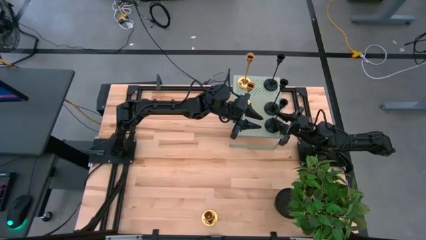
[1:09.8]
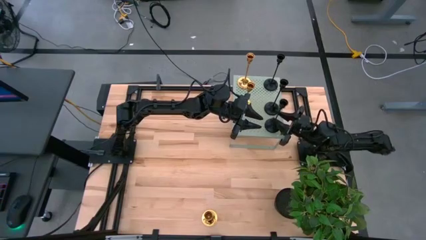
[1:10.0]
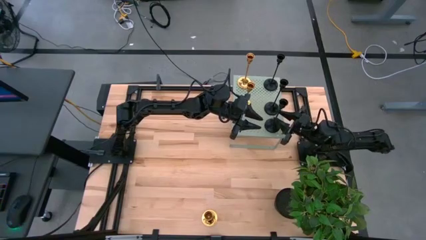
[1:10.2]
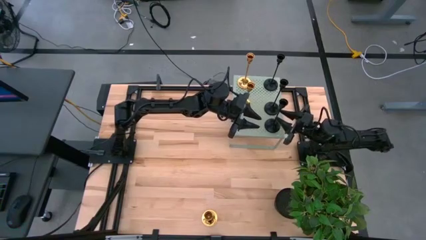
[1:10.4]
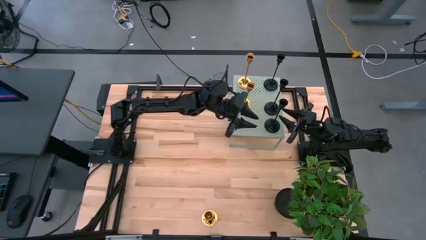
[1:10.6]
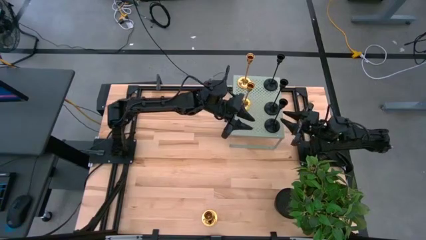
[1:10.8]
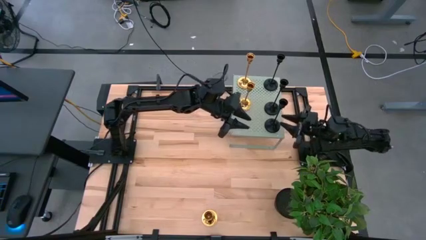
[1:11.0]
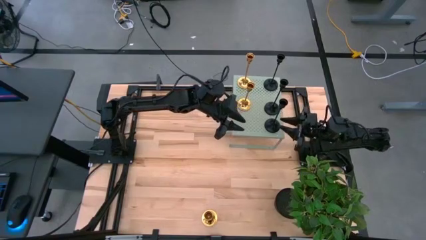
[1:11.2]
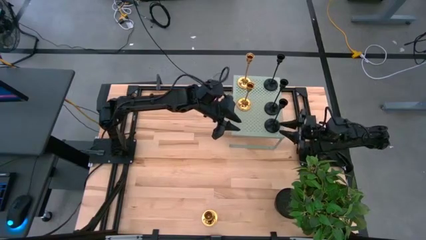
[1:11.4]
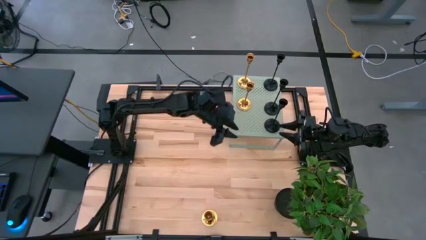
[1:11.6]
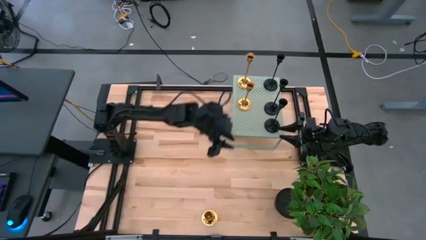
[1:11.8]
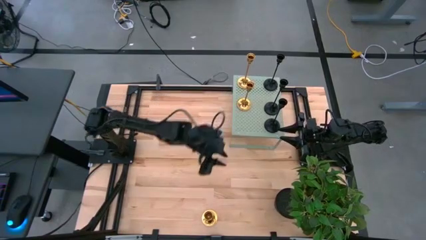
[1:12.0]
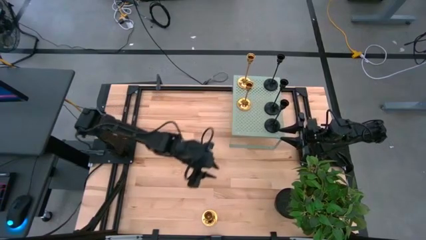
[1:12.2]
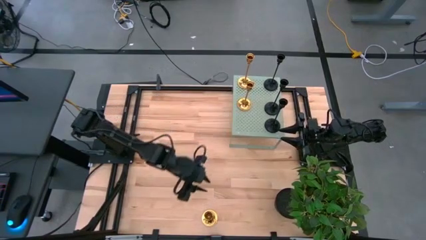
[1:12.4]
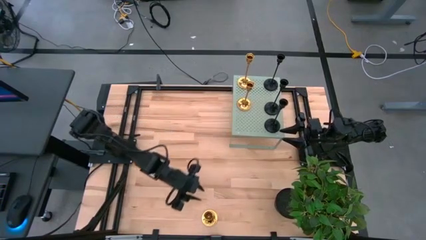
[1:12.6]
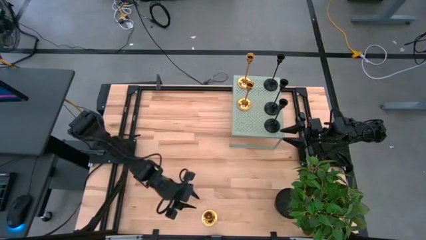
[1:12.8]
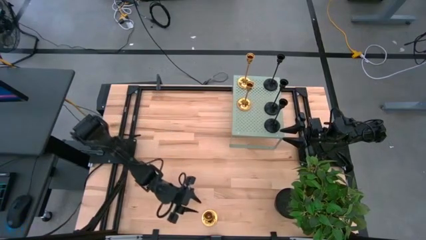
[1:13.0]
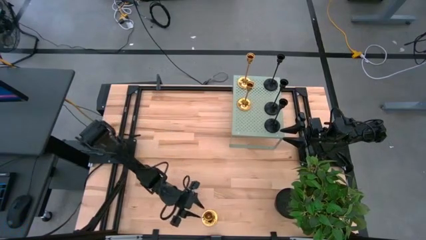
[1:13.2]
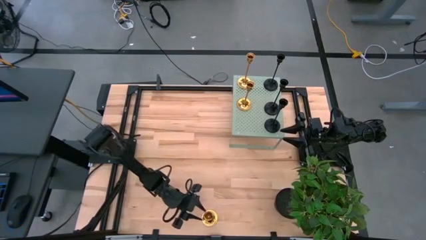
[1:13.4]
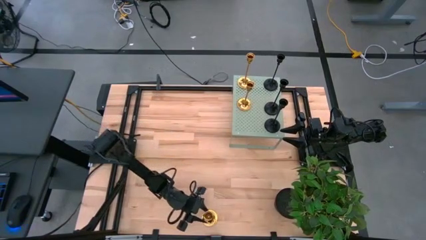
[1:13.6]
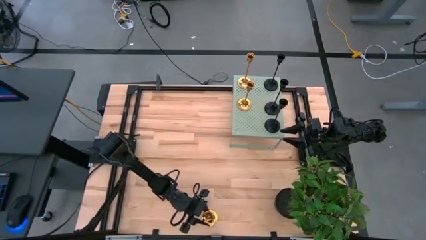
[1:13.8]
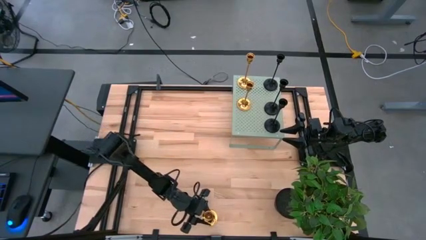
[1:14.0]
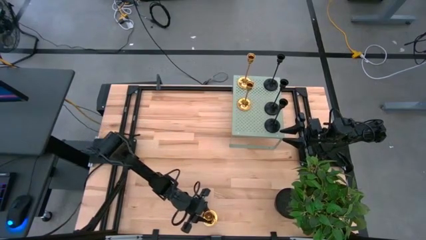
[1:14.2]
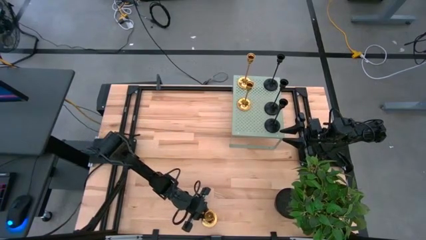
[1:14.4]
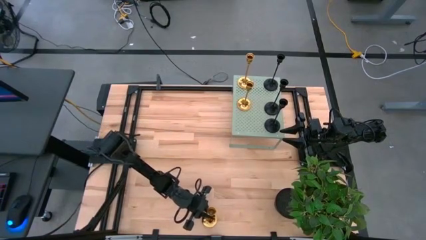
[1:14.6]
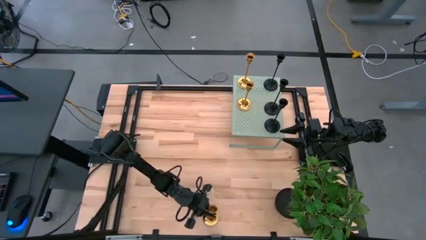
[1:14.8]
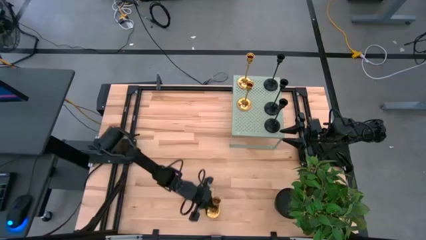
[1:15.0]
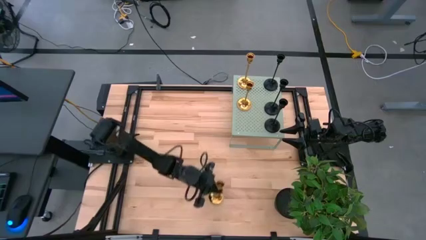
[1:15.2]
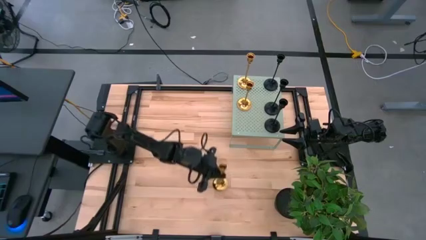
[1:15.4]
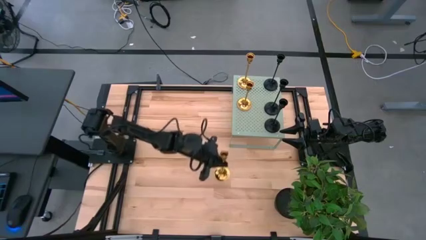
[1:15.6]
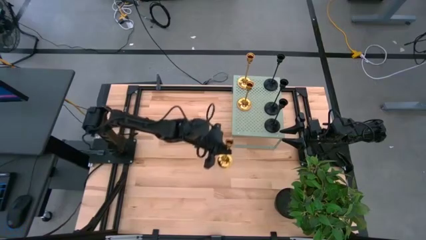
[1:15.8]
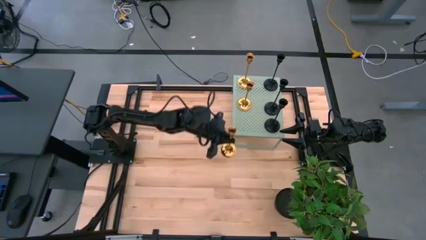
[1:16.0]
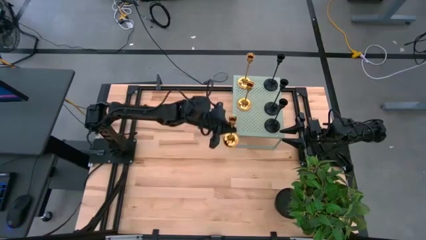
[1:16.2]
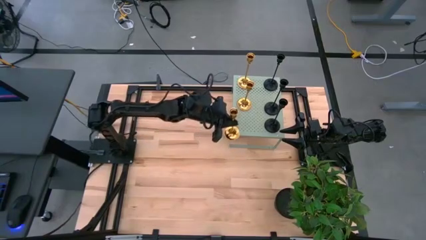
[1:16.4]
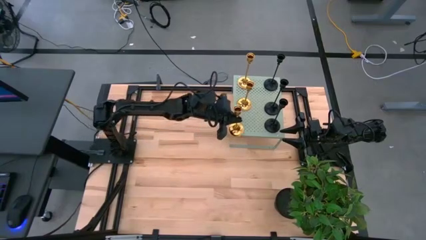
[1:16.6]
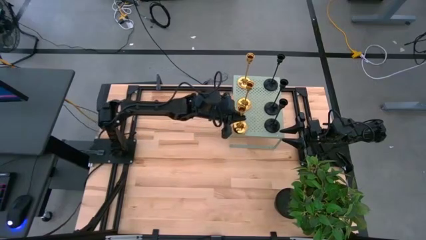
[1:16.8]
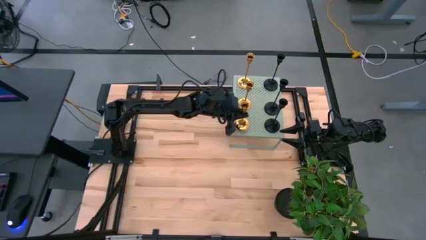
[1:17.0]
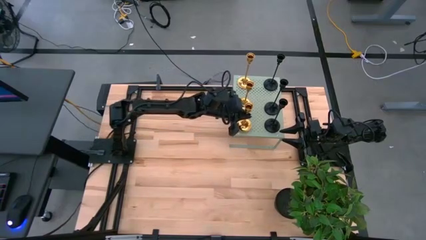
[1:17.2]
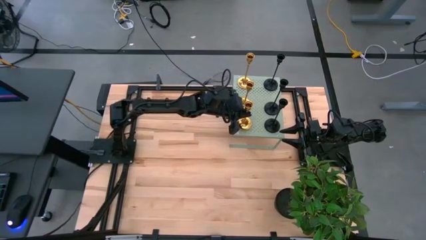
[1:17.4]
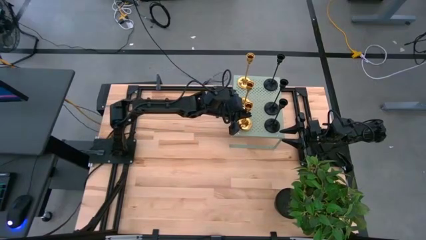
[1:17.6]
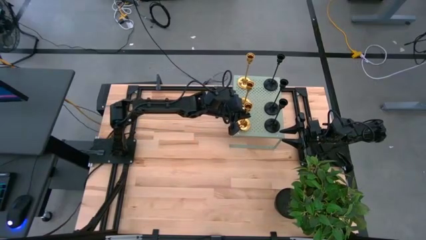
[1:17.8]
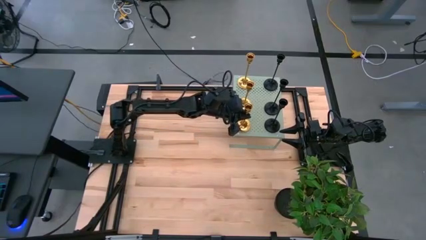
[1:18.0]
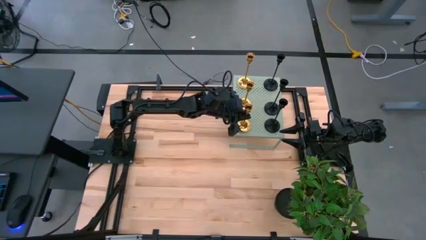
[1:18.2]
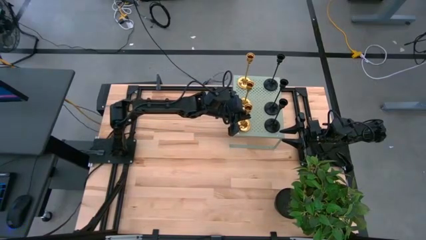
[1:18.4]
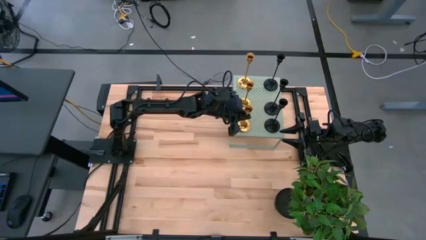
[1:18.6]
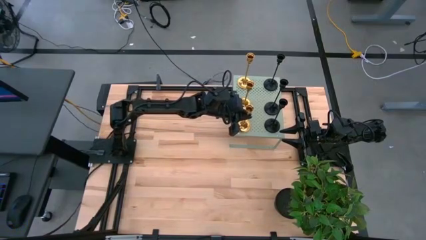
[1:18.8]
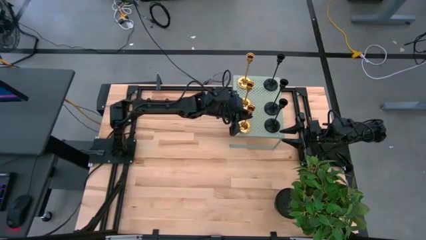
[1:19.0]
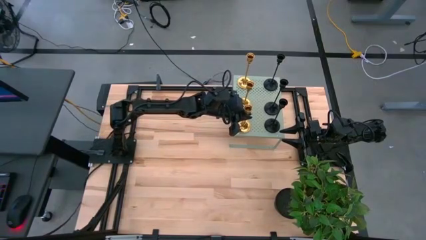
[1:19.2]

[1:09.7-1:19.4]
Task: Pick & Place candle stick holders
Put the light brown candle holder on top of the shelf aligned with the other light brown candle holders

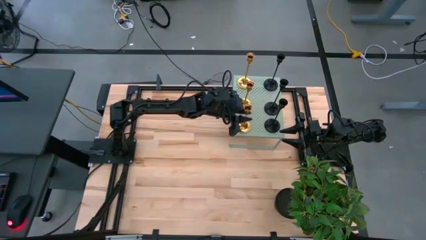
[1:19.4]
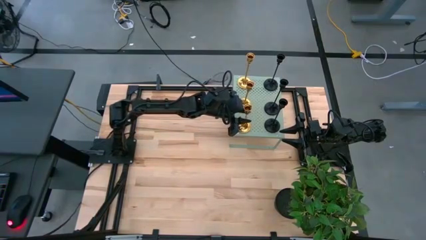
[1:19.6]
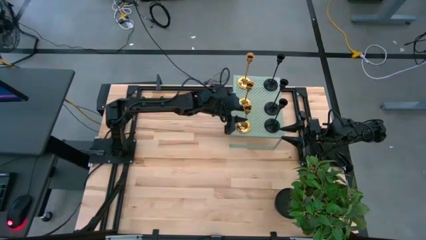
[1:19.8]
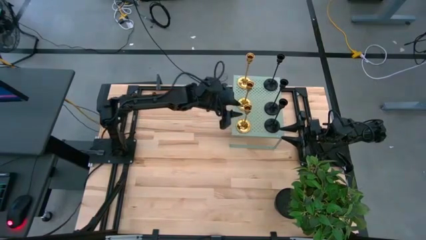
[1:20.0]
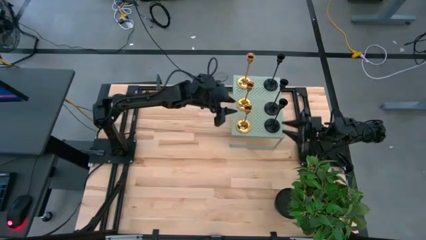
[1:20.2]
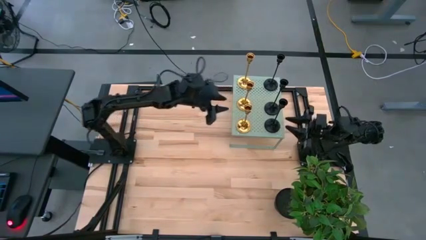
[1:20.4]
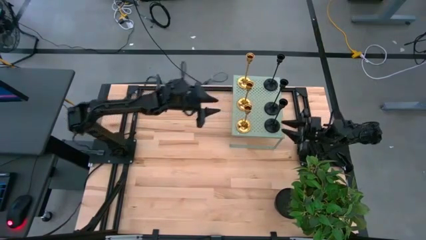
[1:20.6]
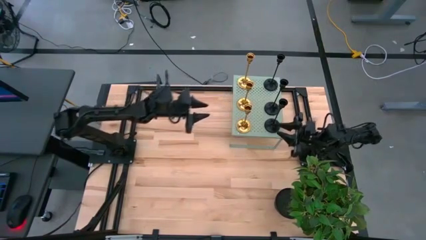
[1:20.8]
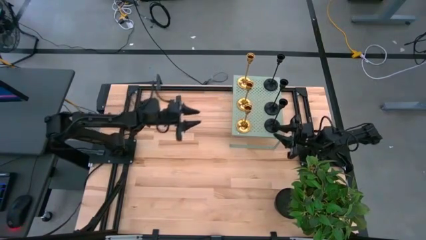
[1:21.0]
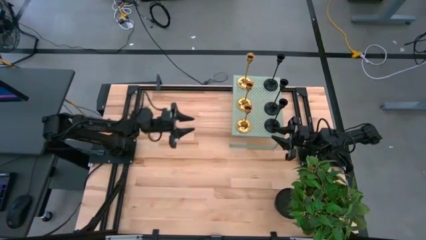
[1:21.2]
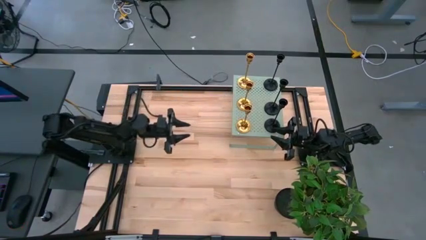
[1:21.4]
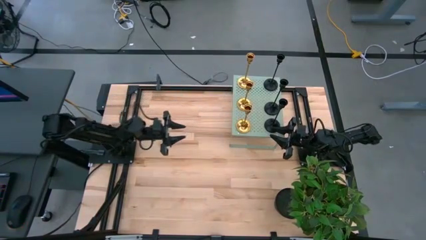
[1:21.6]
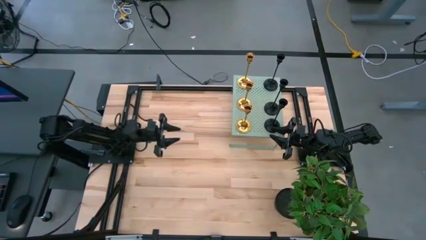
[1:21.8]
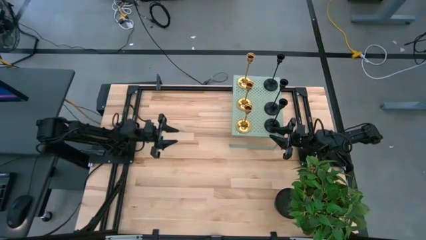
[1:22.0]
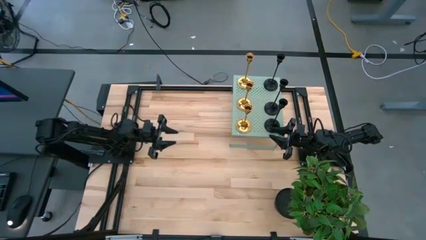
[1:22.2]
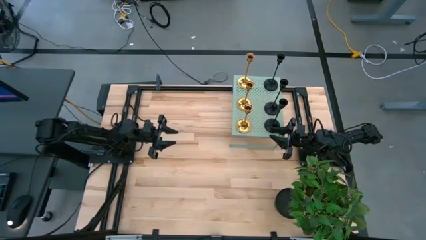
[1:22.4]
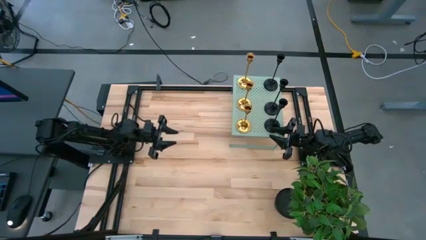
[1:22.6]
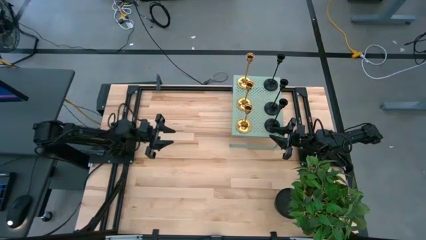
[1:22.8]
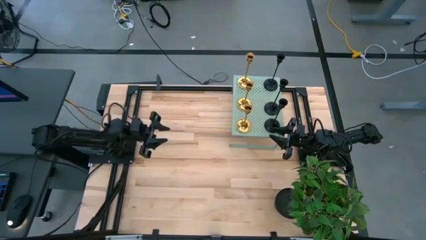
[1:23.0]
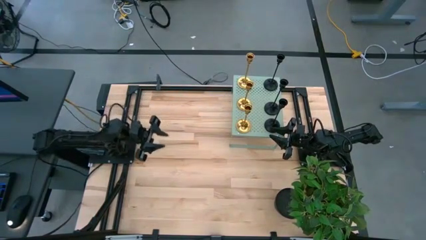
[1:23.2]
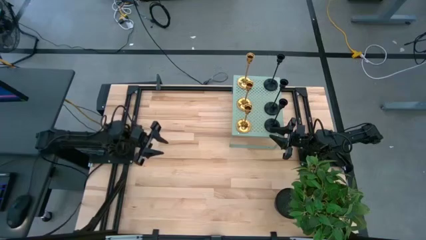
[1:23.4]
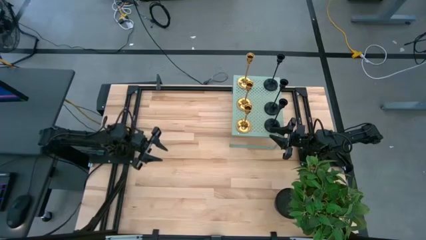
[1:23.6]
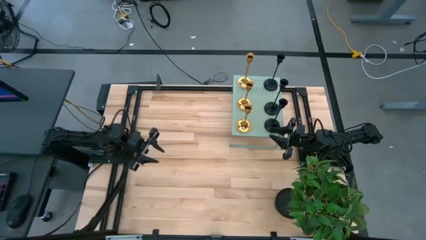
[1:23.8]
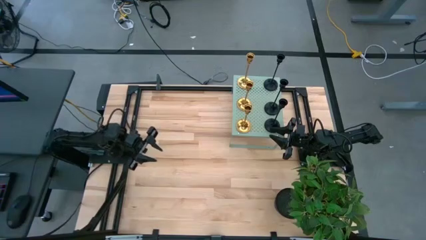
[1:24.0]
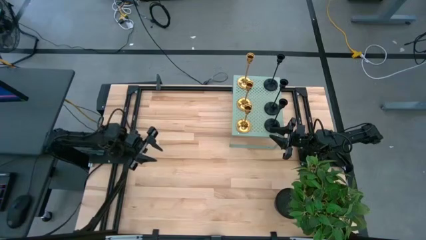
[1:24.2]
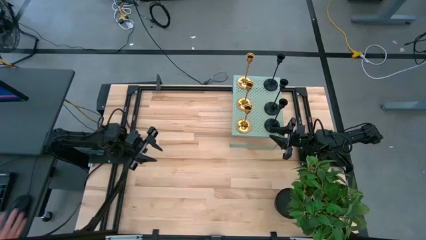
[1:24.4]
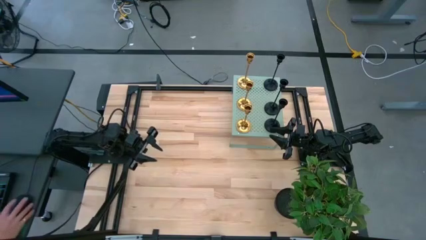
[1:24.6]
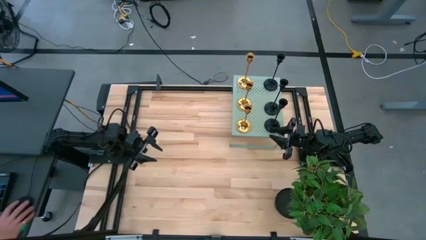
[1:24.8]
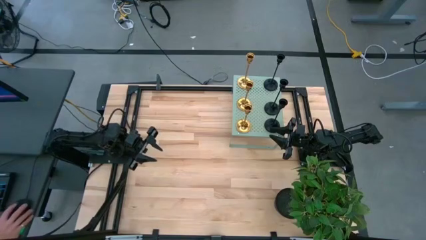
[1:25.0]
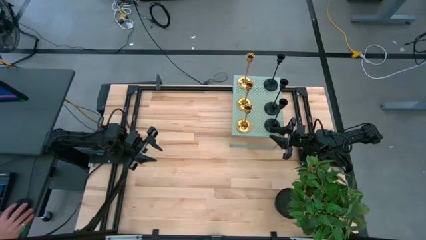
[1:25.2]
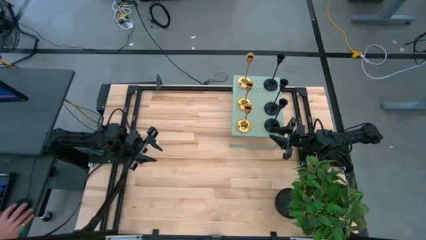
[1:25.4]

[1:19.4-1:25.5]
Return to Home Position
